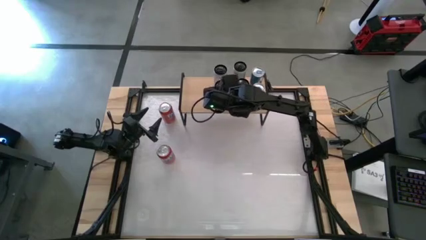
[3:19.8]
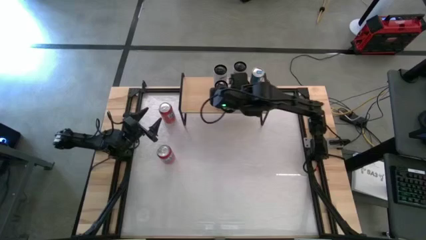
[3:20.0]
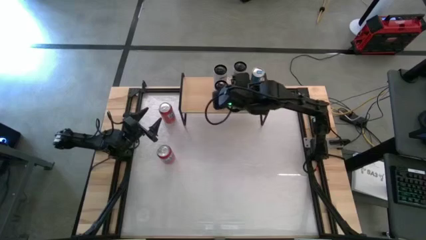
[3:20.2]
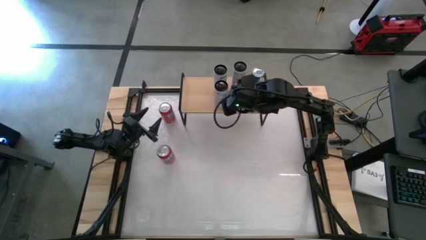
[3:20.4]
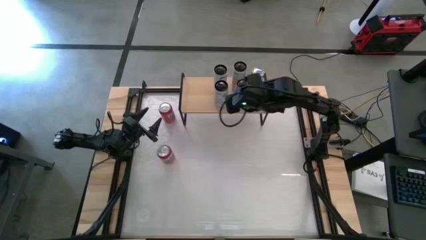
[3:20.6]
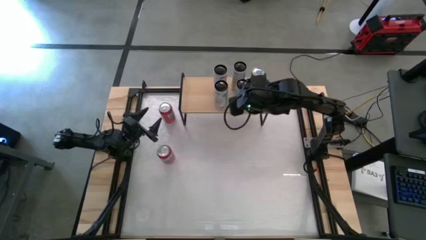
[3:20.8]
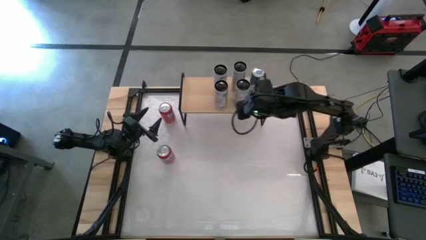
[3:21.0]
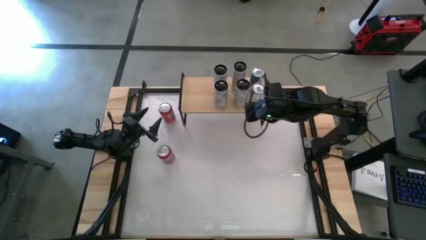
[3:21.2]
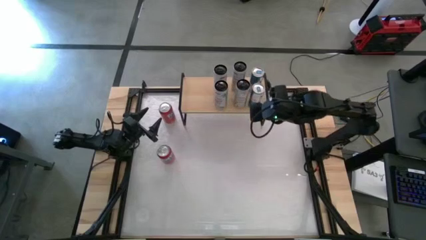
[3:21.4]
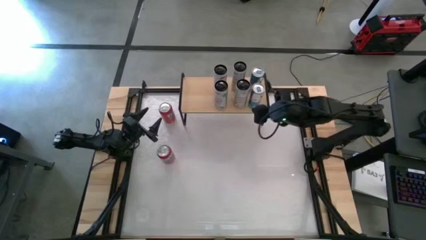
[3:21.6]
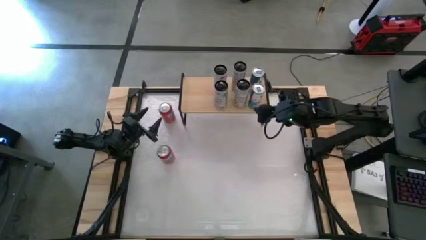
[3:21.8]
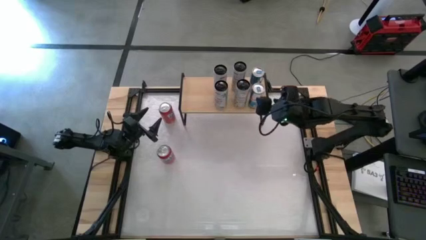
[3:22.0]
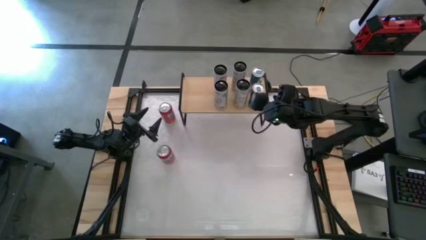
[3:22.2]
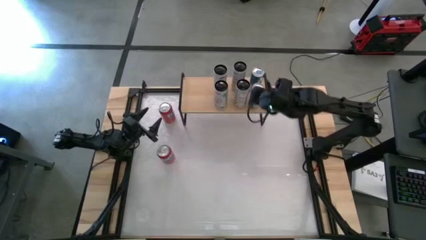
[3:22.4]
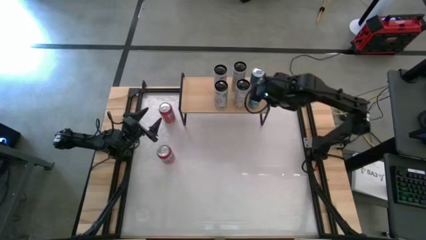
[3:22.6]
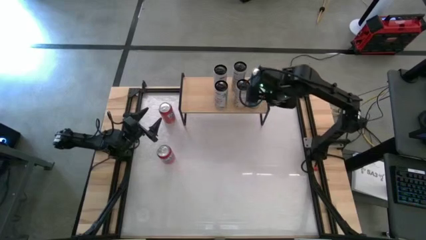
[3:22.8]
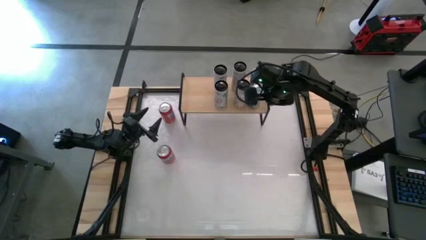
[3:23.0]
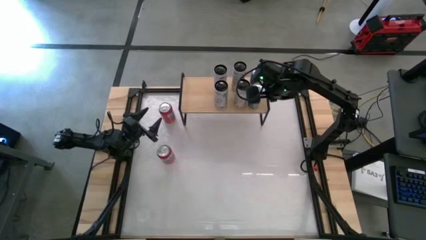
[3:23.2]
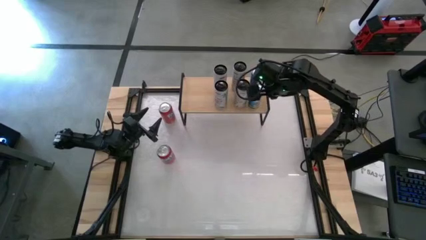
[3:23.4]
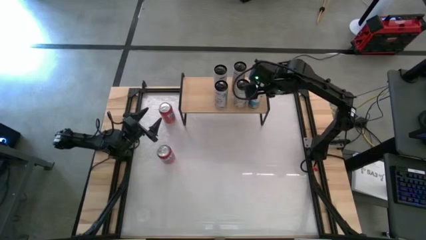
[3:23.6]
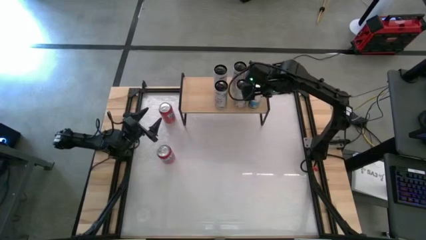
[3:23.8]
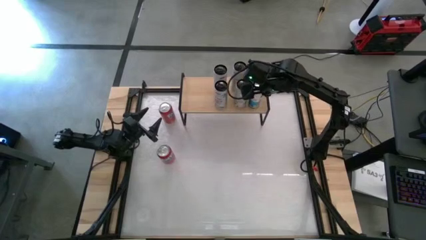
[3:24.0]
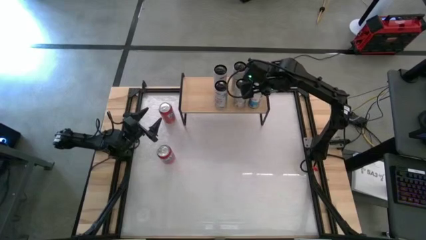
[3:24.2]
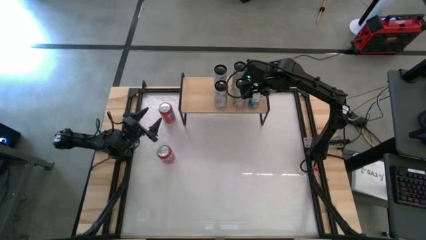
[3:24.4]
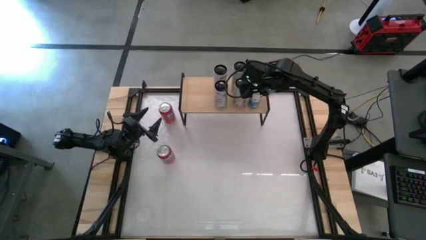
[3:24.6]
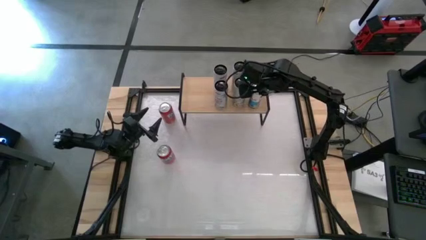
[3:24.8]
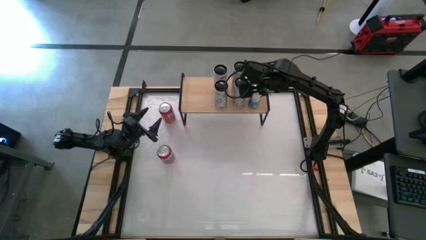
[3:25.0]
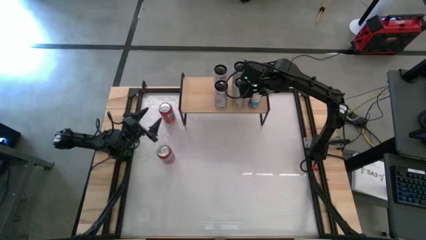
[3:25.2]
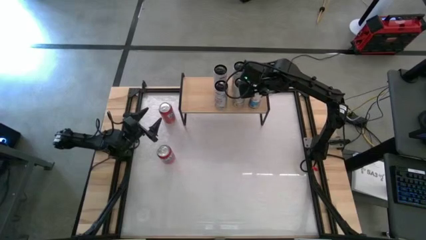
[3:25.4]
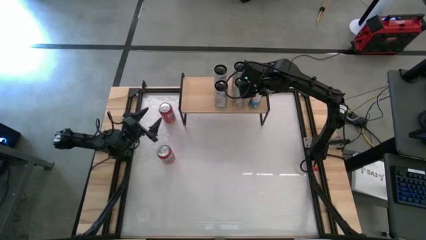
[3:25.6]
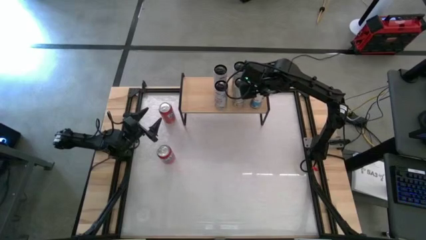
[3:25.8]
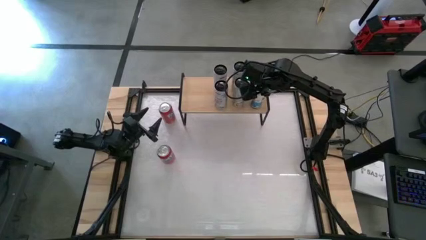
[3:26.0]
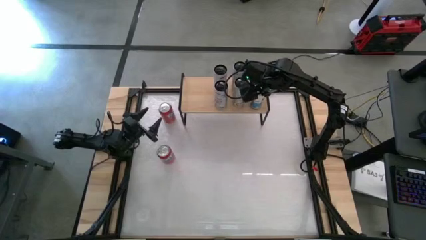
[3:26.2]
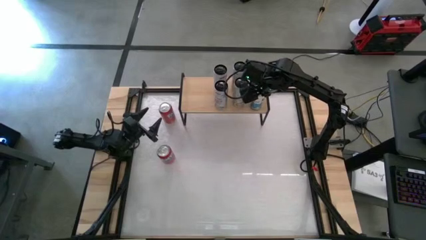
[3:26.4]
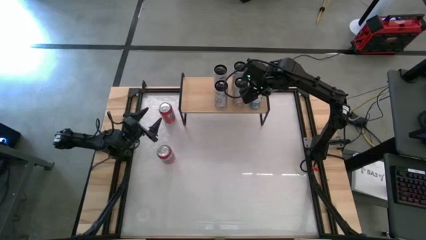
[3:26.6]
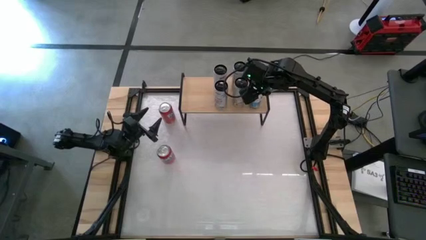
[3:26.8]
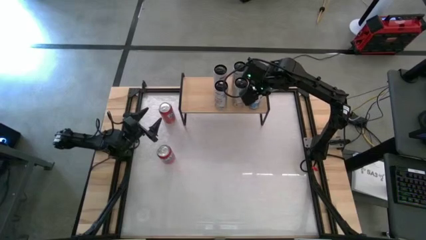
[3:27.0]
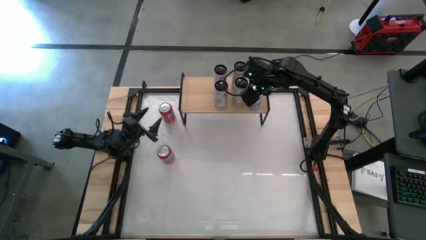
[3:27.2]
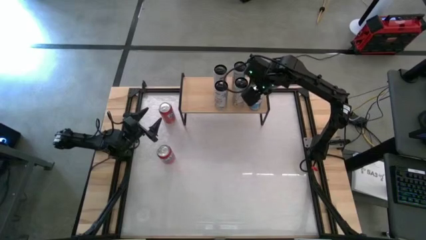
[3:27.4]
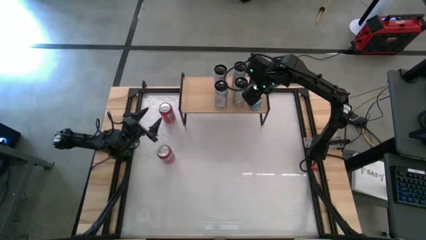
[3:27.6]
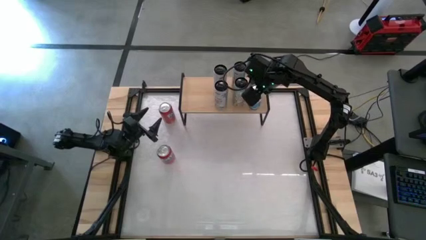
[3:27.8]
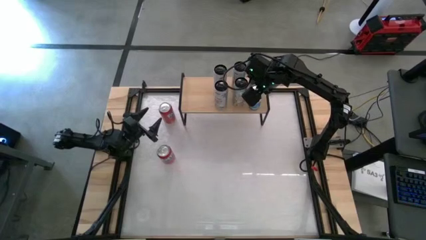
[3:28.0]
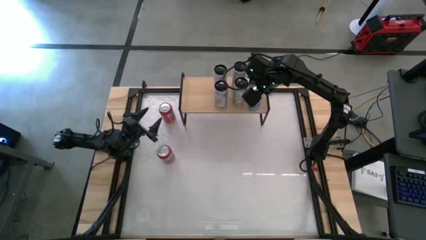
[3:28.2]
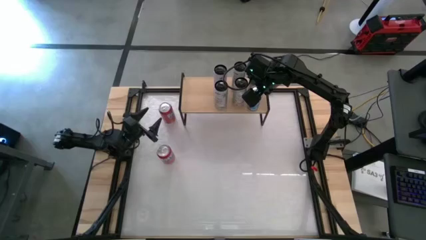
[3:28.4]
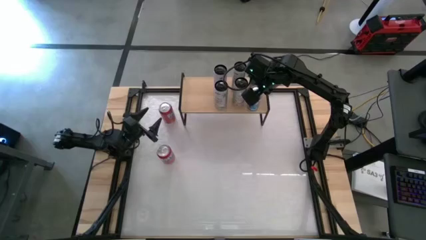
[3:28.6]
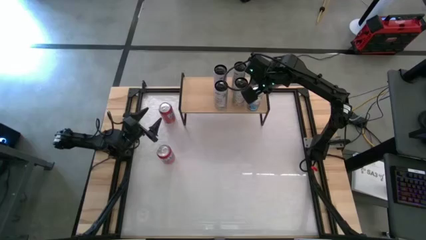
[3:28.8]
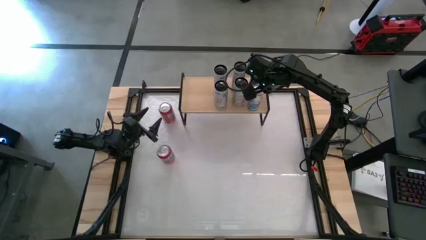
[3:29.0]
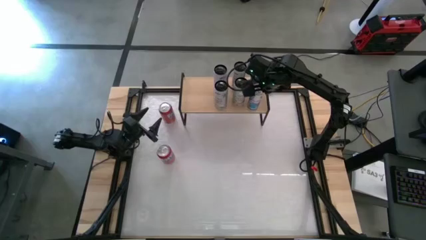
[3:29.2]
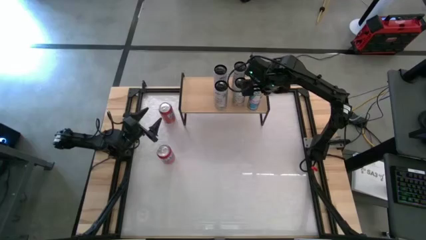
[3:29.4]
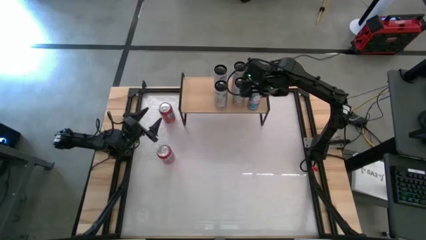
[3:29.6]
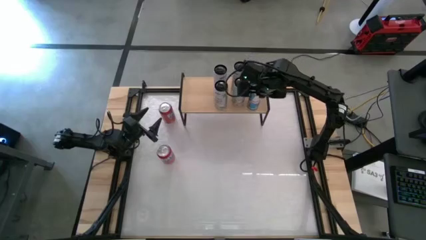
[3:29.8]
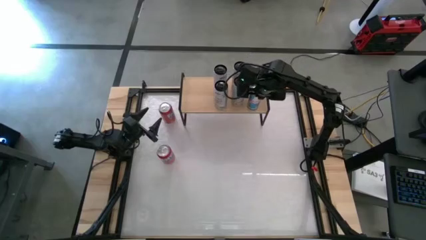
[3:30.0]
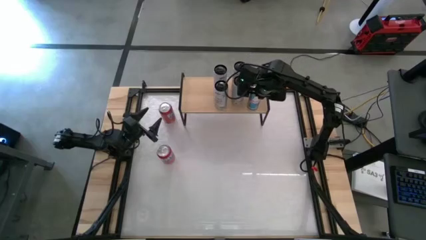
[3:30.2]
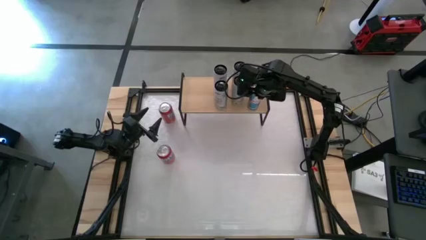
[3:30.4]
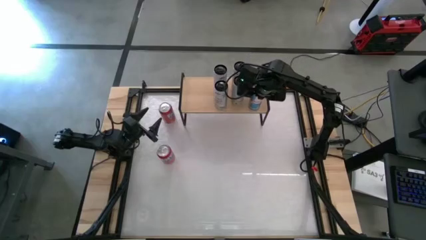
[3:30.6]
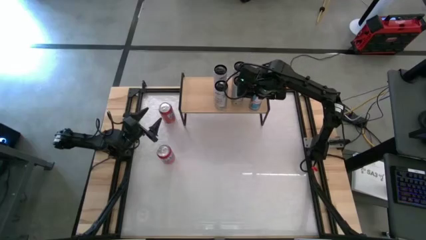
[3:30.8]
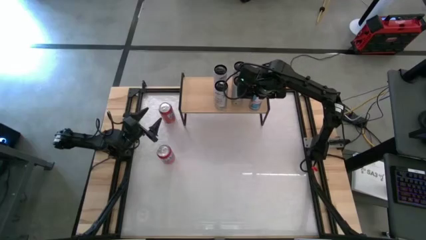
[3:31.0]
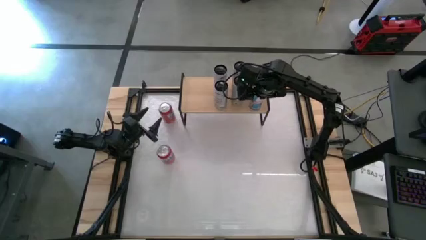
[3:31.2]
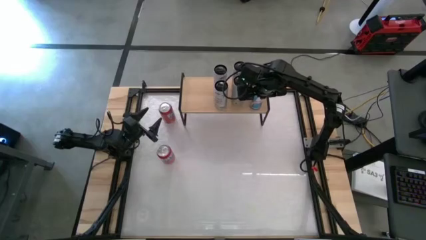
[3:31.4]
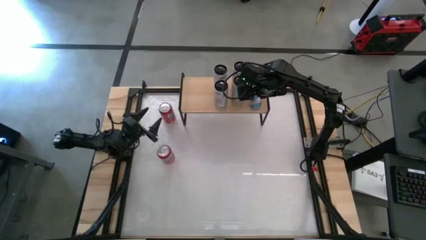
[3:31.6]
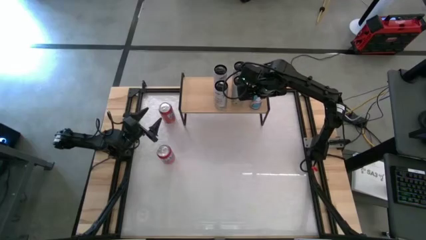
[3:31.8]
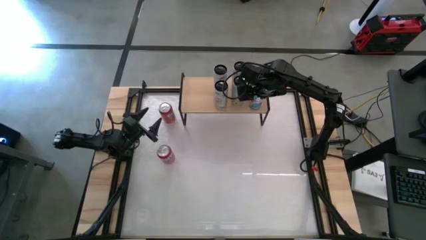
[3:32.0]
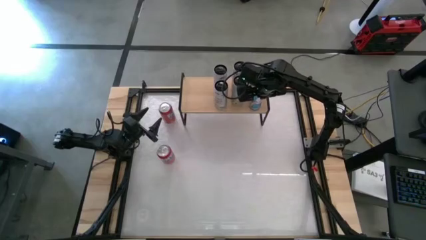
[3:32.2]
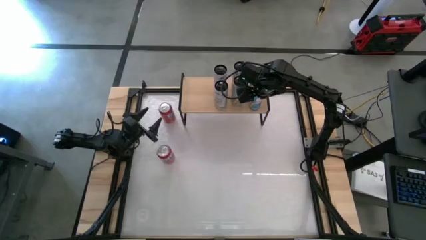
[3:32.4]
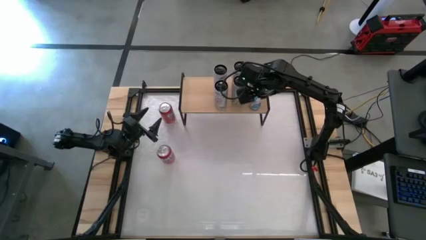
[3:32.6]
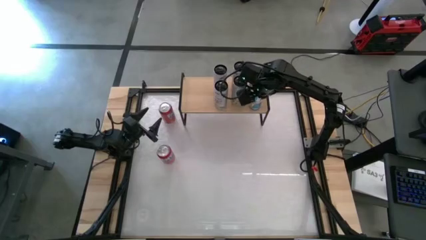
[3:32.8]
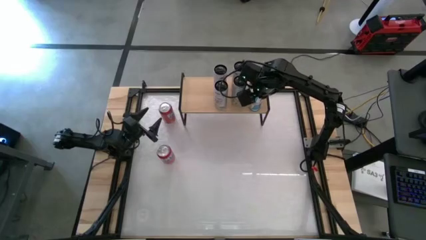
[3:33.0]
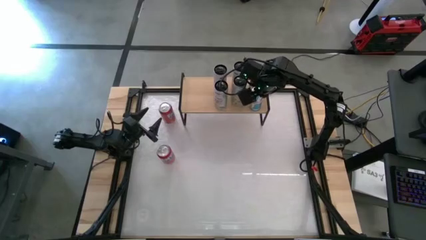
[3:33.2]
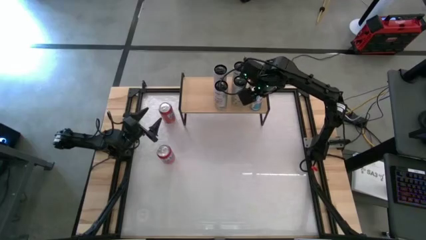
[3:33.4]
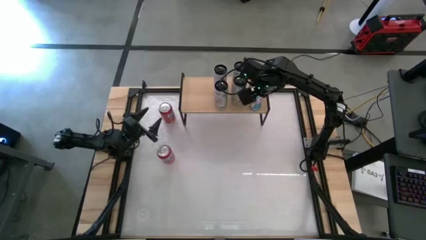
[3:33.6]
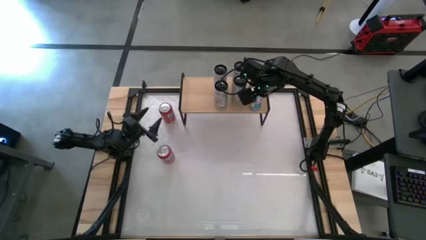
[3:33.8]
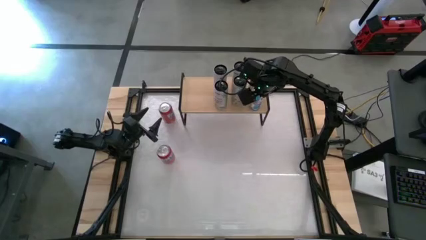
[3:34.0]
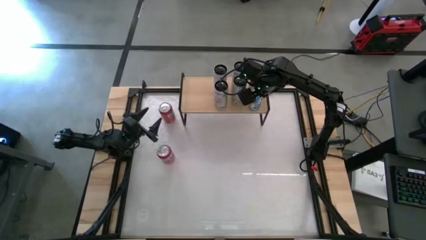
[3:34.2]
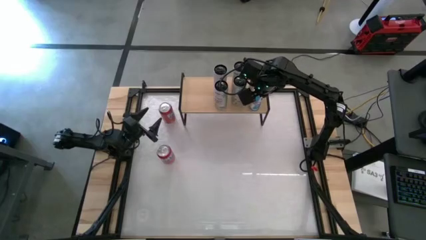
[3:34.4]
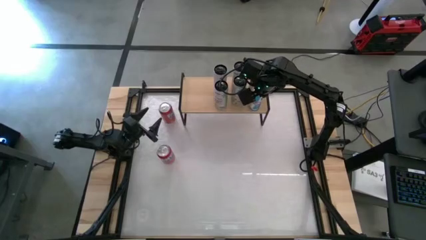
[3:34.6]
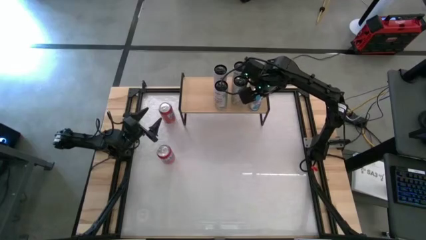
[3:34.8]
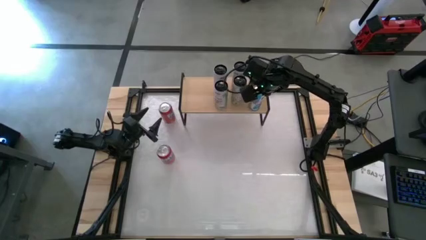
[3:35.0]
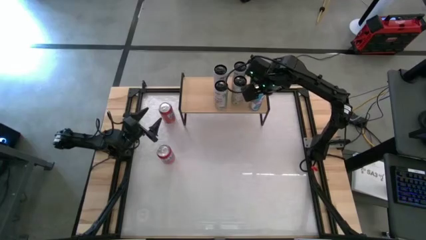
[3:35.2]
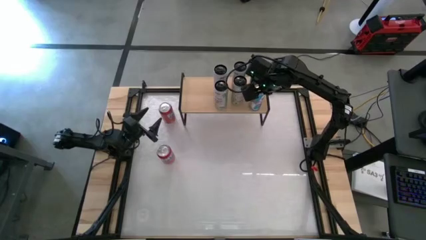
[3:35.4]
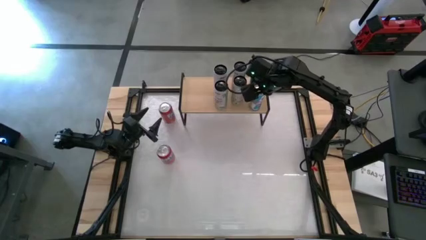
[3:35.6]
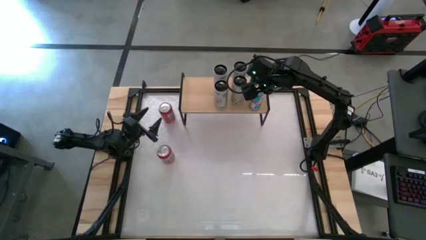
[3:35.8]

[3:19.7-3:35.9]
Task: Place canned beverage on shelf
Adjust the blue soda can
